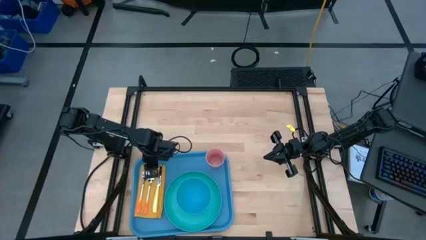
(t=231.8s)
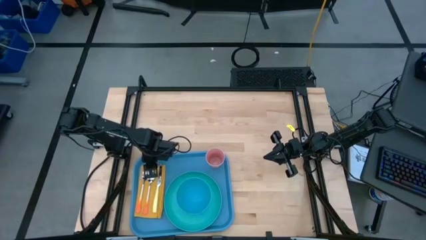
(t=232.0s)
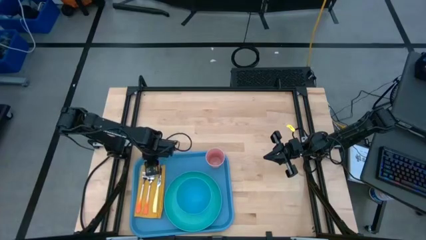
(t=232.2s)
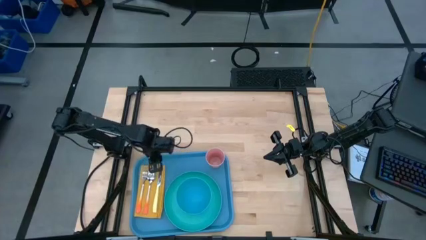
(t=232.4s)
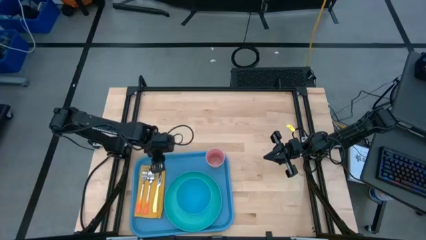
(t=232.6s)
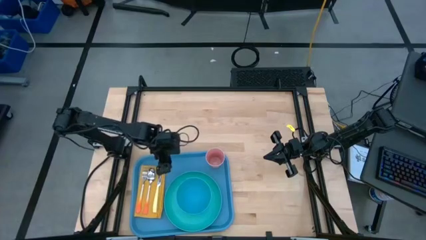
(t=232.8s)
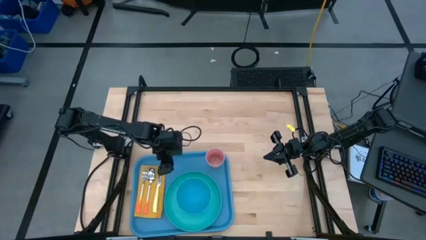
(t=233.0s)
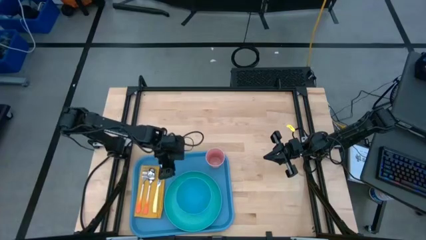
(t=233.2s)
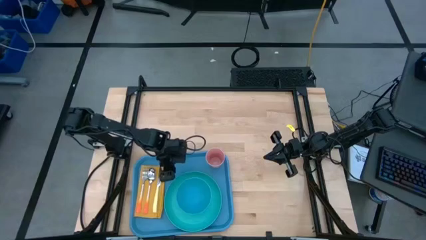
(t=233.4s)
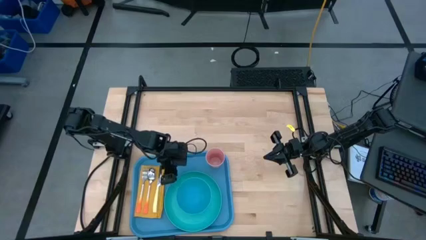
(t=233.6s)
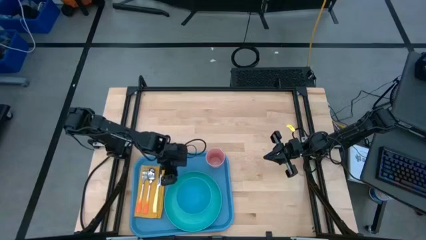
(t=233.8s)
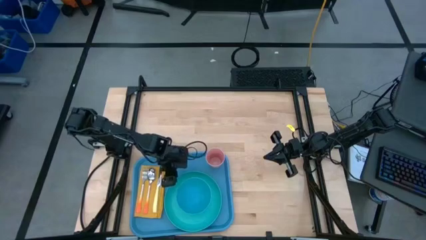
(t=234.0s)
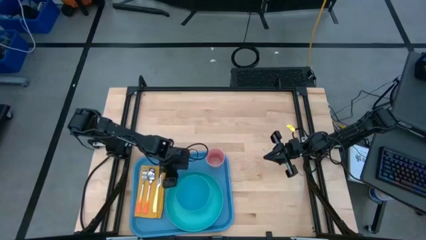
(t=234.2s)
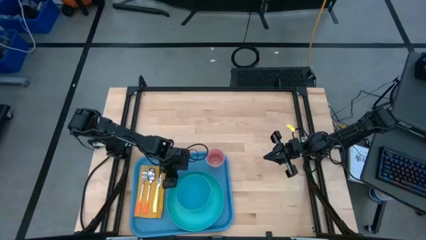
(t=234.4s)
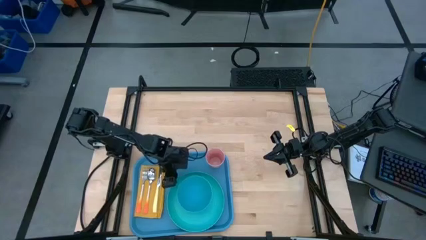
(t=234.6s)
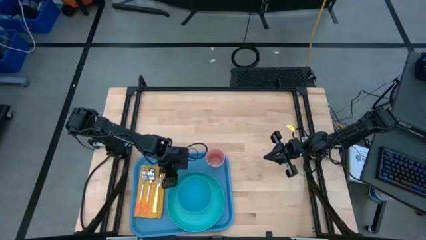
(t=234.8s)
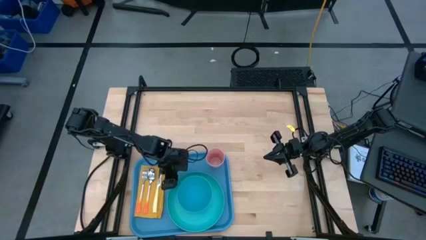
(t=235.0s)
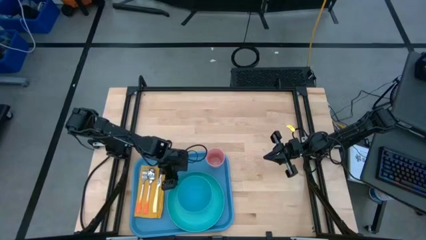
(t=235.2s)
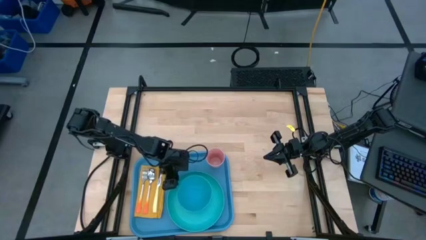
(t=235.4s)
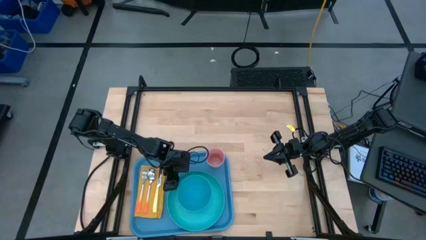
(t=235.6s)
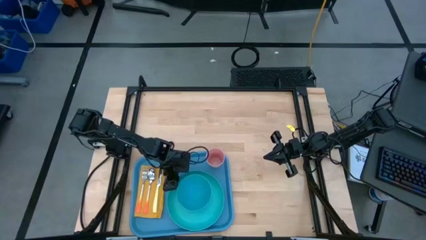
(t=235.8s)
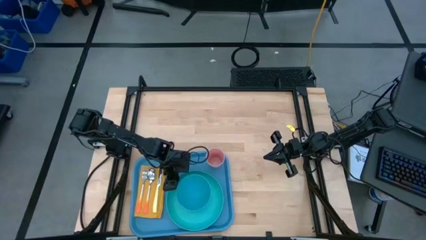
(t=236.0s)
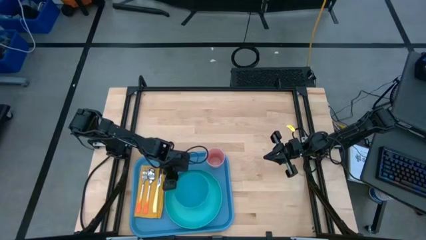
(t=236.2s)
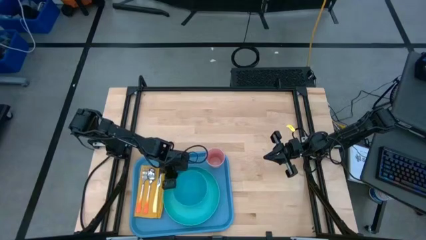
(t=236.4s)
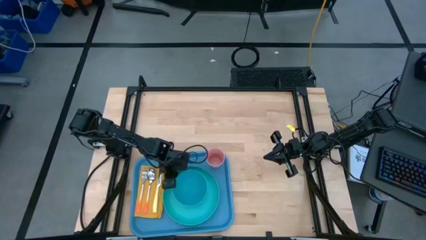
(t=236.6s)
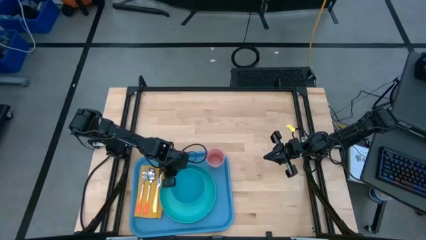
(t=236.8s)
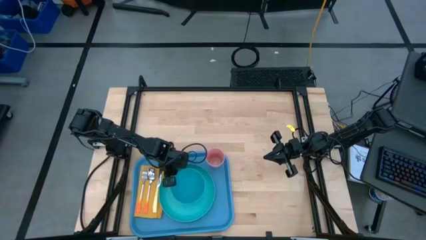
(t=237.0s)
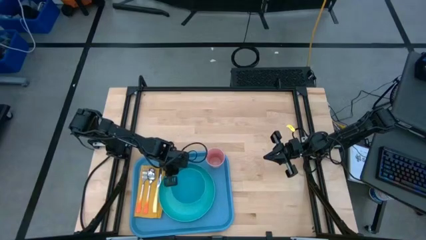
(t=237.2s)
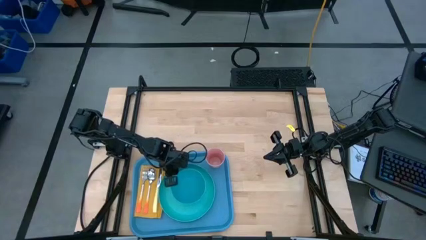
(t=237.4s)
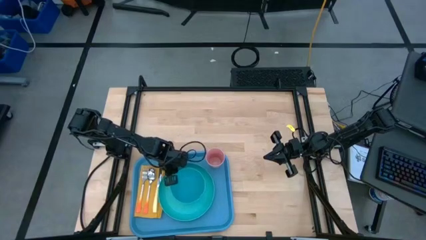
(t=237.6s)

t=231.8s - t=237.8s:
Task: Set up tray
Adjust the green plate on the blue tray

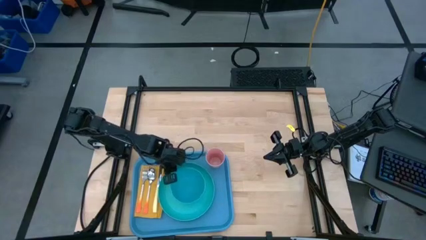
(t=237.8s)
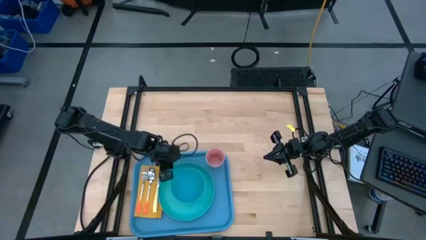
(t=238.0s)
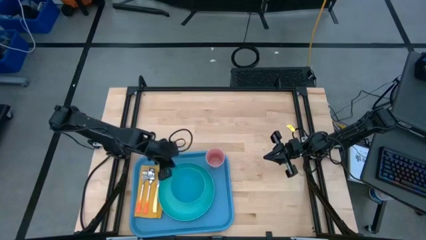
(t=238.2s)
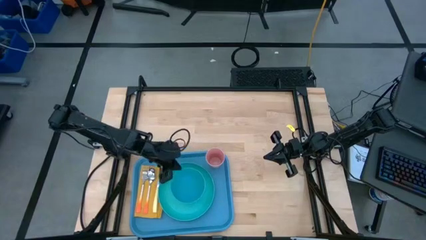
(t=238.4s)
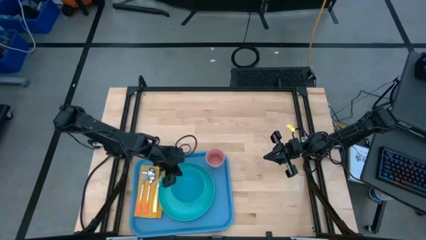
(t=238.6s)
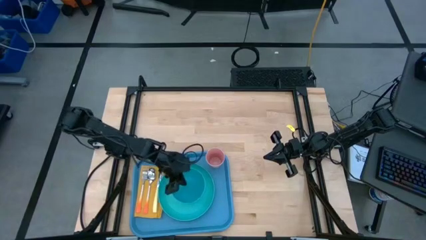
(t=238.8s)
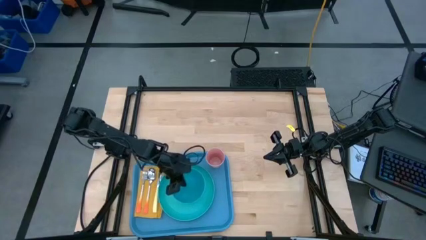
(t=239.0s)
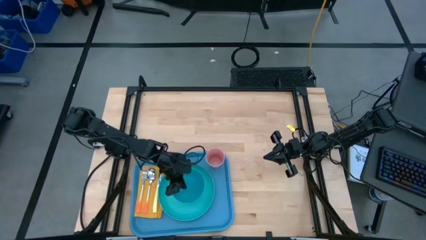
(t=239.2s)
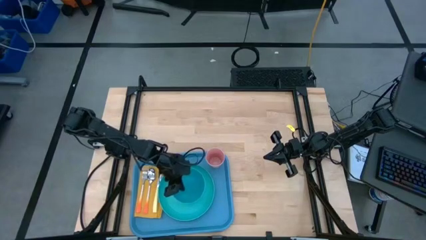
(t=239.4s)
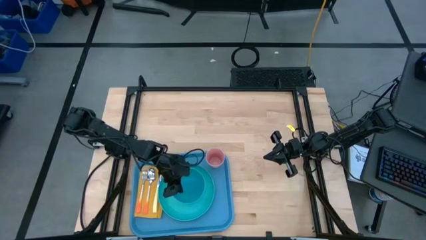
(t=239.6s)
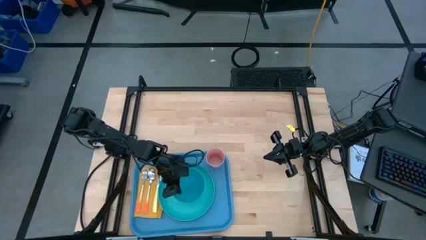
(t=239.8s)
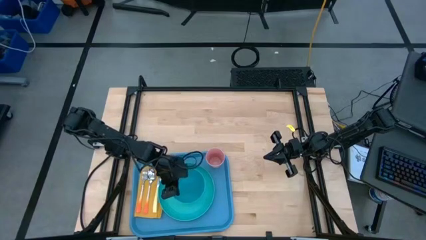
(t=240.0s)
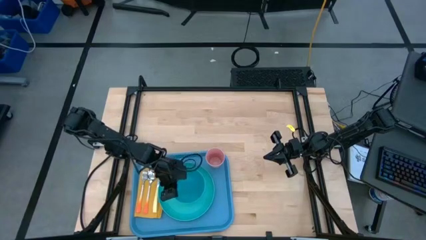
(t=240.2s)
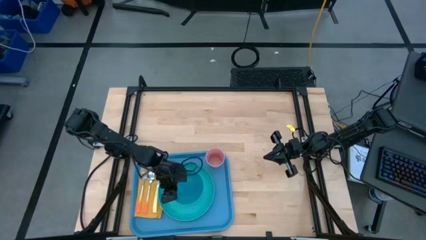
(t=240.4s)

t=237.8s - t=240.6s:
Adjust the blue bowl on top of the green plate on the blue tray

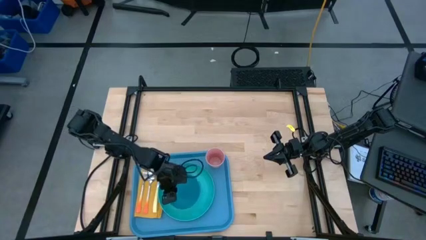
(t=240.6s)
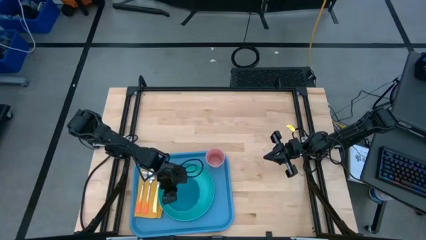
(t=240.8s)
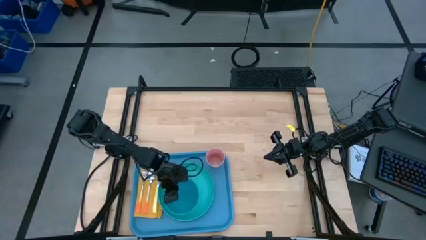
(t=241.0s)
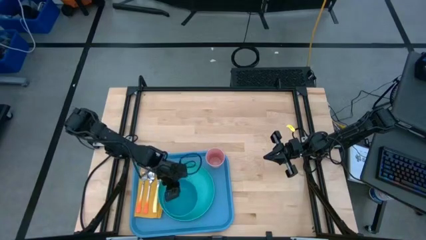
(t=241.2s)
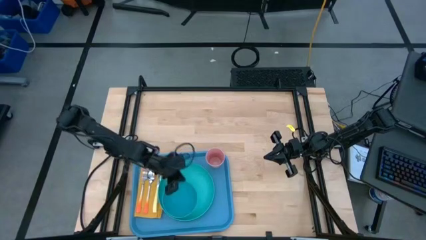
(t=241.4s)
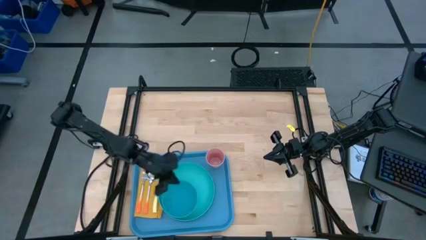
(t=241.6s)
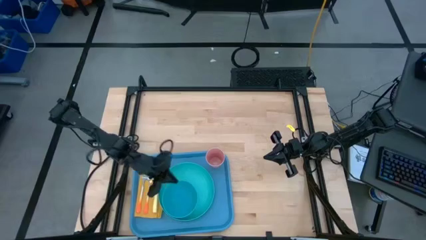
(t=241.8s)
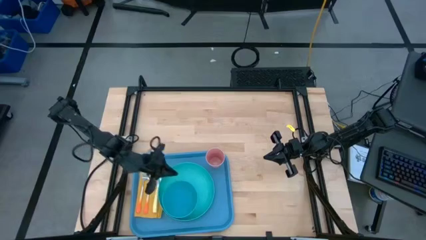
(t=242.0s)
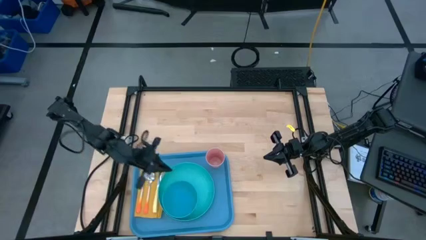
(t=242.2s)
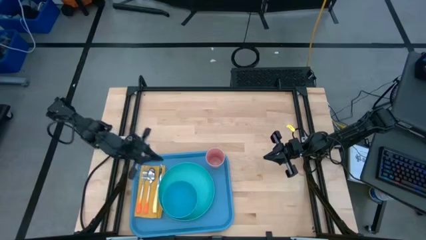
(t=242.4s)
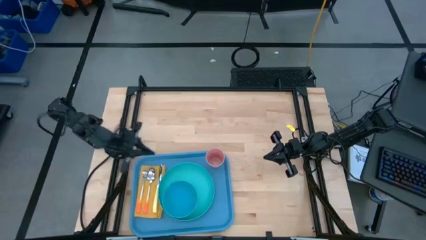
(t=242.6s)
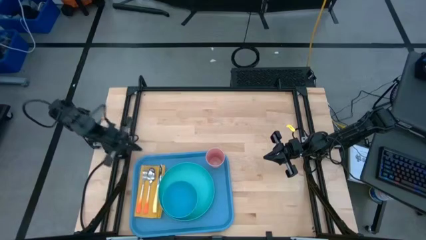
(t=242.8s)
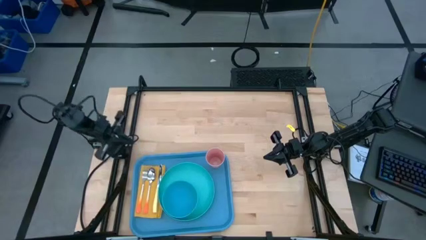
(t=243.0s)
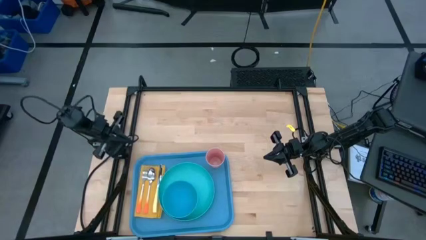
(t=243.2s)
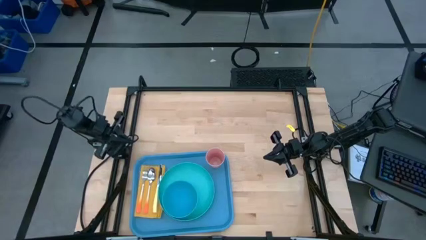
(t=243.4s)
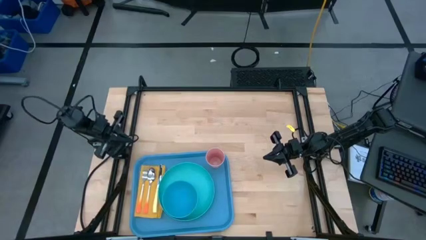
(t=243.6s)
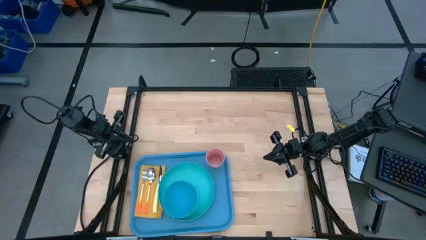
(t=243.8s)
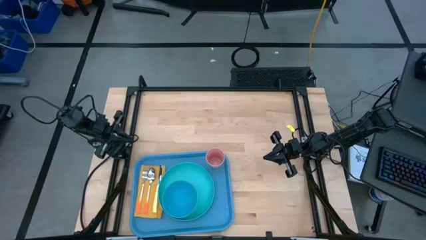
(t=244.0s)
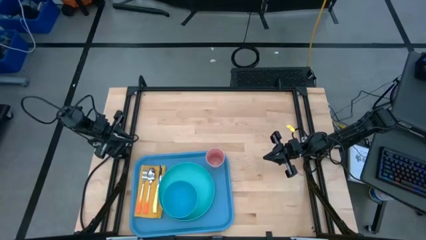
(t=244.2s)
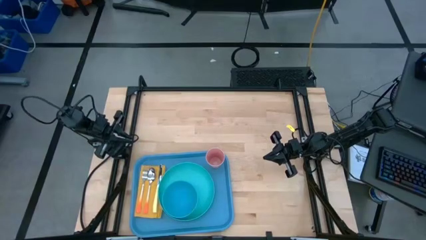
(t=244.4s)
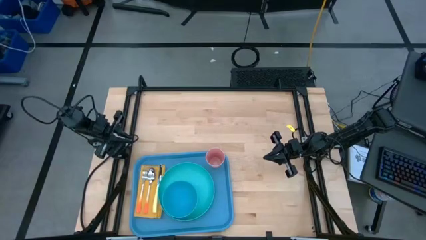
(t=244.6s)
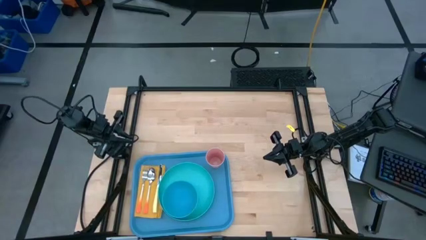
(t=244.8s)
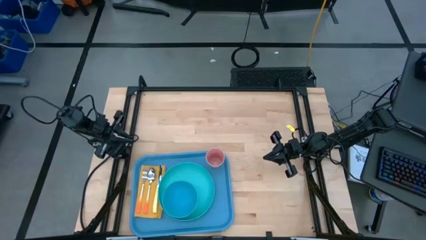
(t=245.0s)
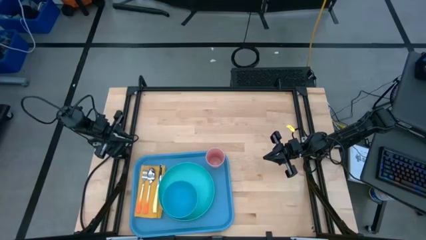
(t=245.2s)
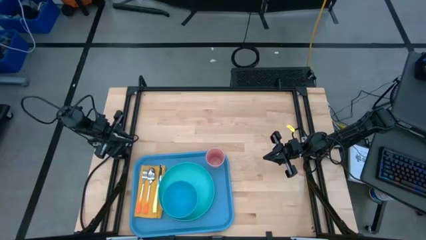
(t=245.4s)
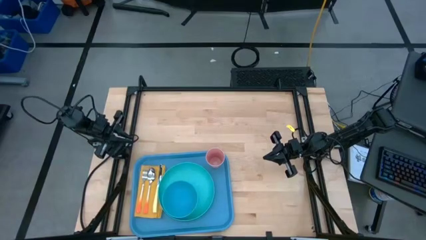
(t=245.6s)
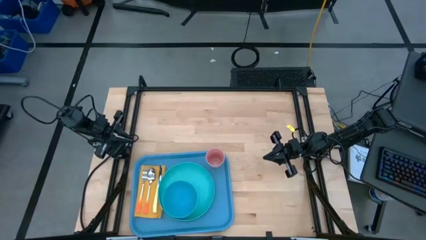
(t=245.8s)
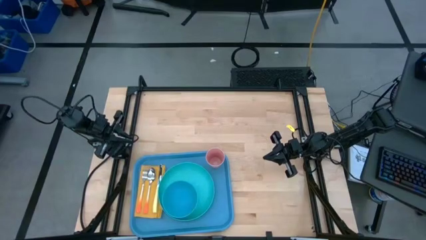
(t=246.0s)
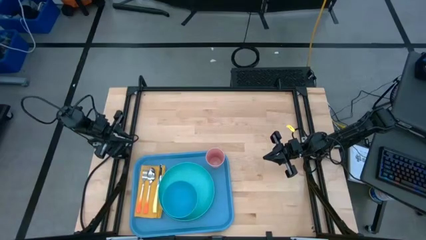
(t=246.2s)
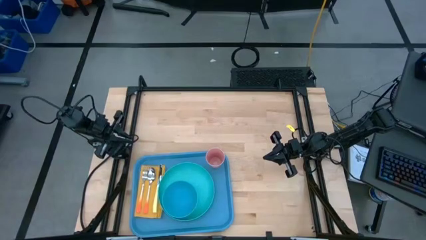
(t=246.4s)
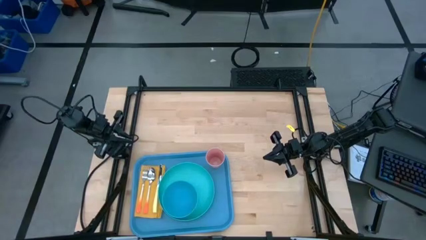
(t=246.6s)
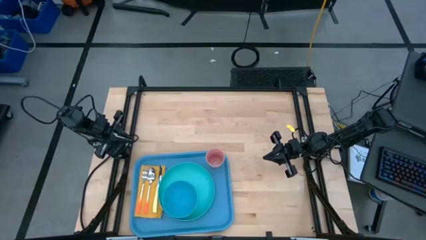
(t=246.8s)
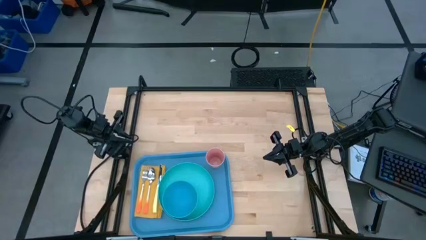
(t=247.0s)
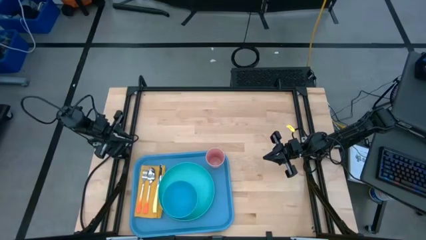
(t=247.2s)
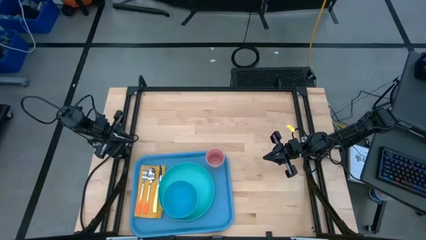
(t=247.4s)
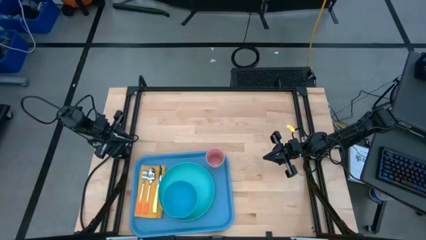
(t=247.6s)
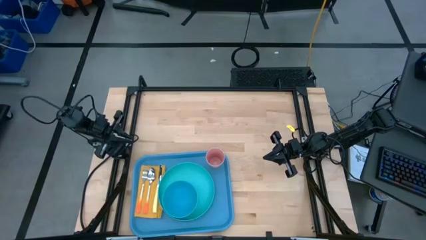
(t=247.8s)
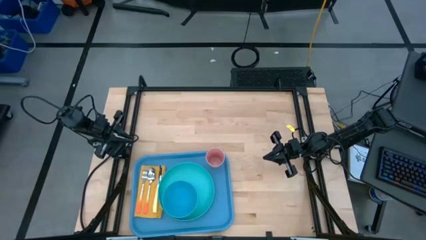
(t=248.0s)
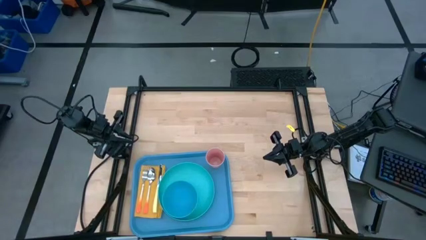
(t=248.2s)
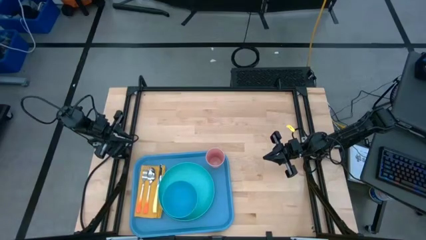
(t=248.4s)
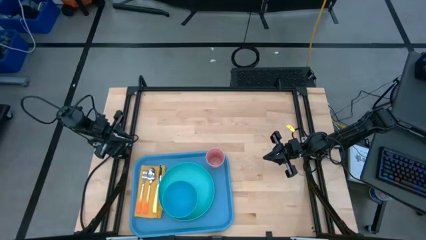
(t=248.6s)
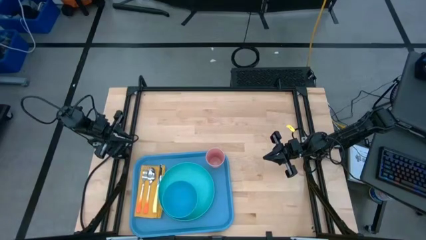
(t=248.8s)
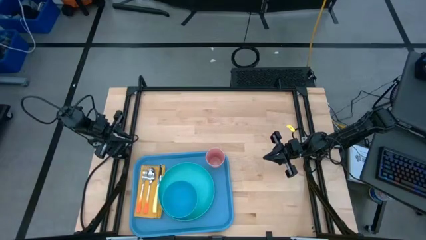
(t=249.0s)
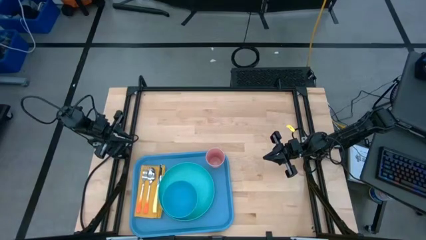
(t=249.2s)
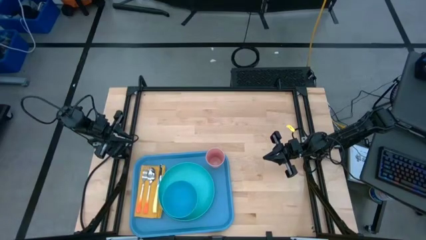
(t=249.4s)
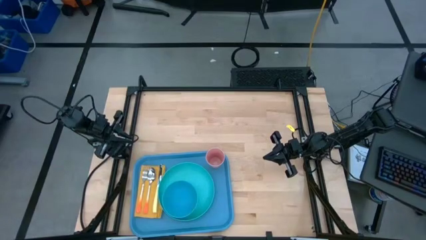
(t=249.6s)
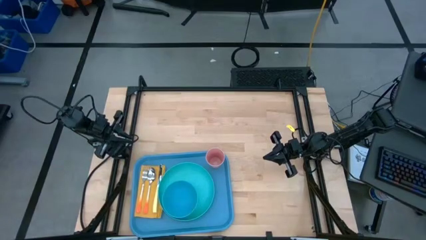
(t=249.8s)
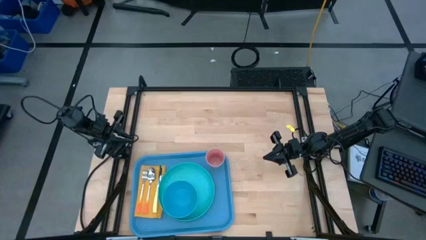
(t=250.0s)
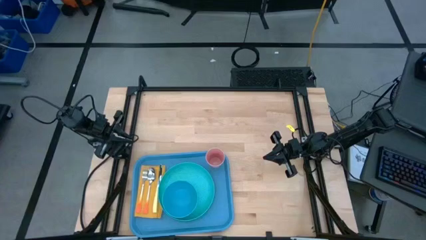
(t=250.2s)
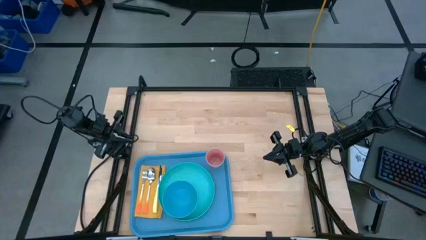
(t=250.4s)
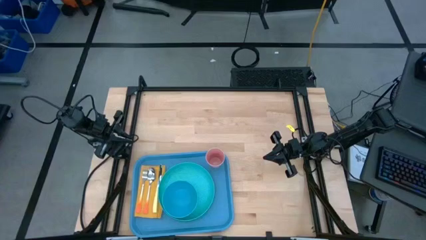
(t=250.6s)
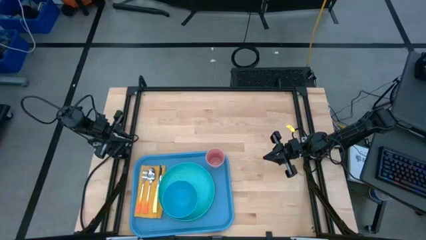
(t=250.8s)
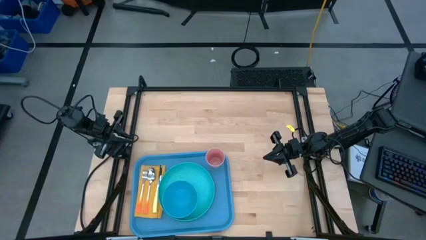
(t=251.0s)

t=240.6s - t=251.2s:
Return to Home Position
